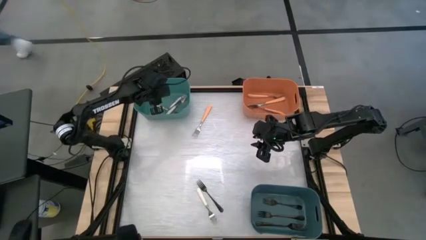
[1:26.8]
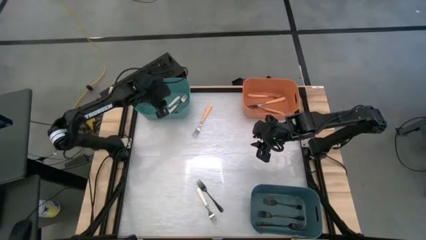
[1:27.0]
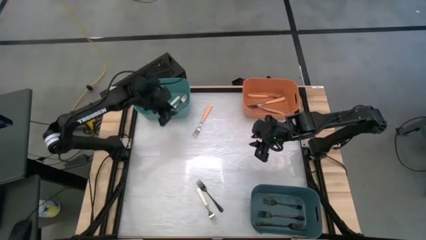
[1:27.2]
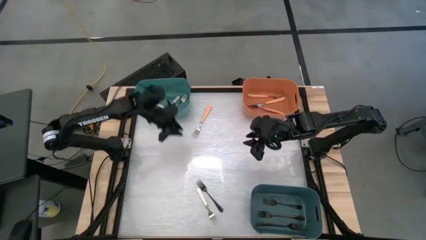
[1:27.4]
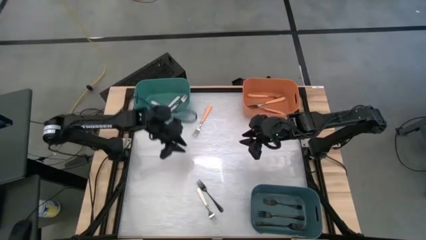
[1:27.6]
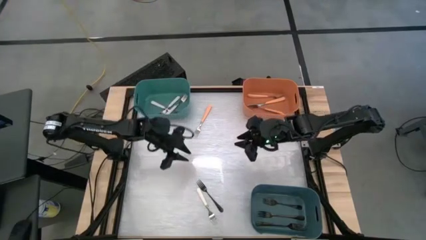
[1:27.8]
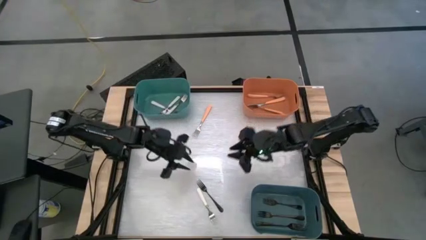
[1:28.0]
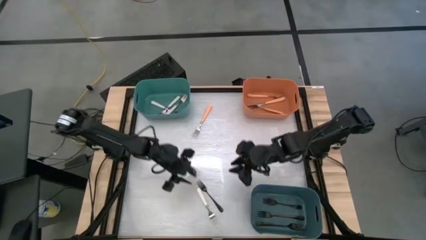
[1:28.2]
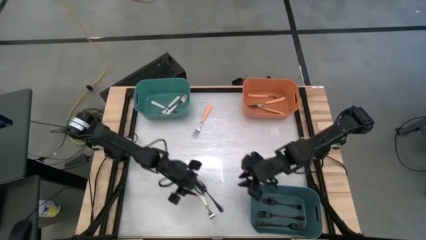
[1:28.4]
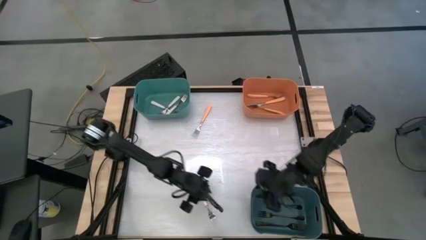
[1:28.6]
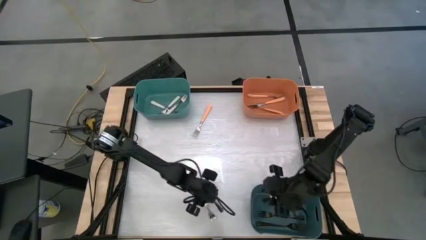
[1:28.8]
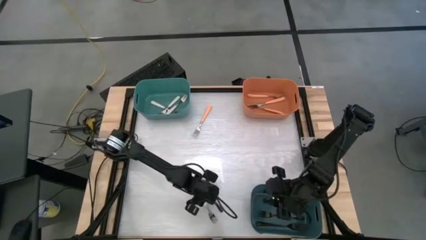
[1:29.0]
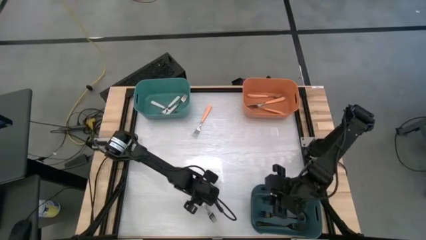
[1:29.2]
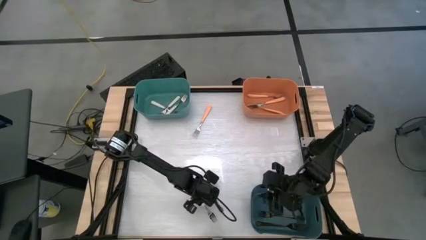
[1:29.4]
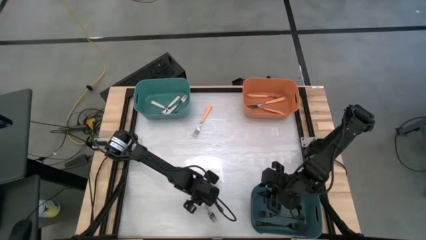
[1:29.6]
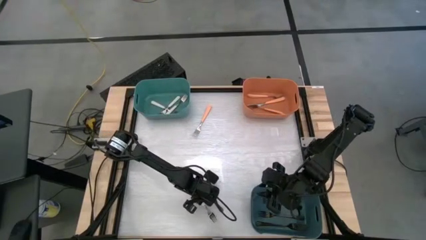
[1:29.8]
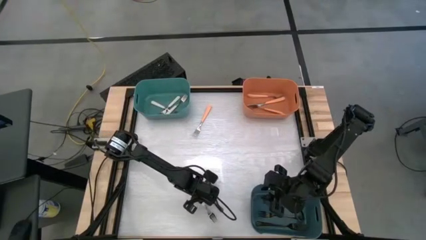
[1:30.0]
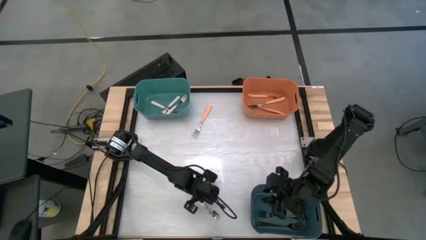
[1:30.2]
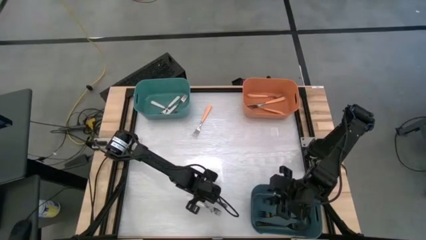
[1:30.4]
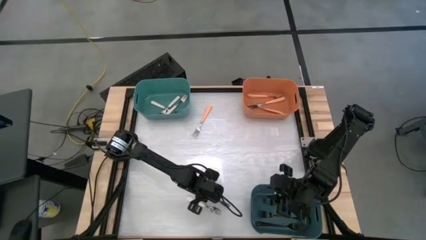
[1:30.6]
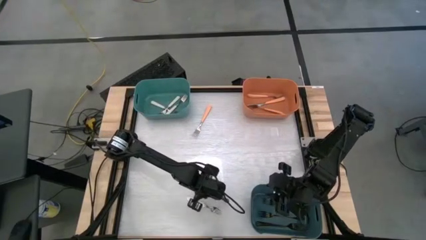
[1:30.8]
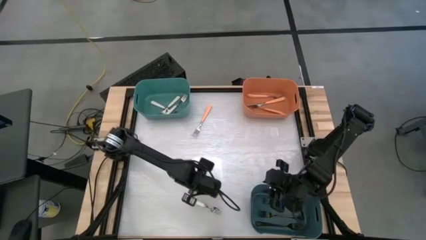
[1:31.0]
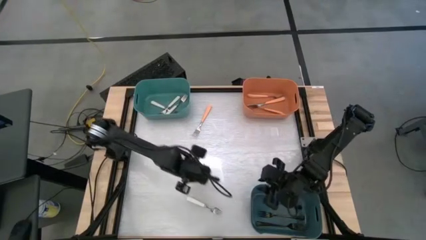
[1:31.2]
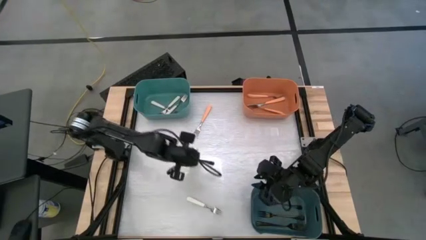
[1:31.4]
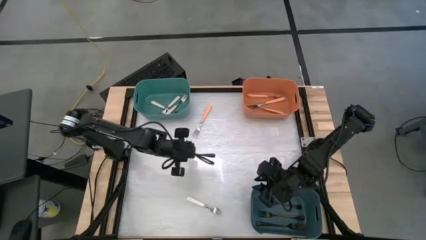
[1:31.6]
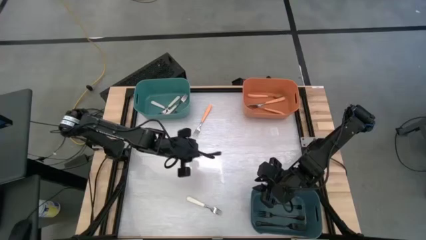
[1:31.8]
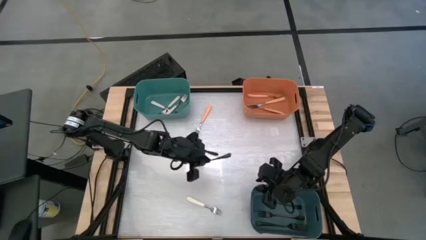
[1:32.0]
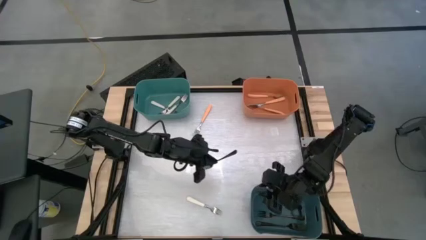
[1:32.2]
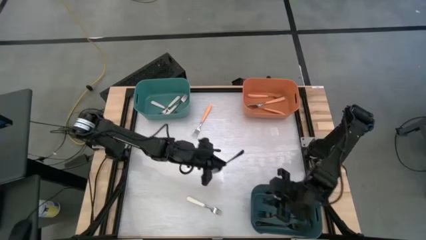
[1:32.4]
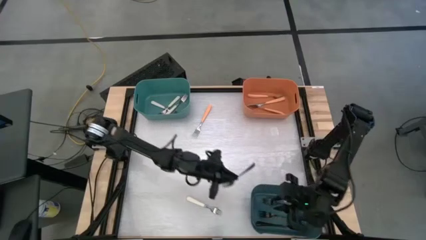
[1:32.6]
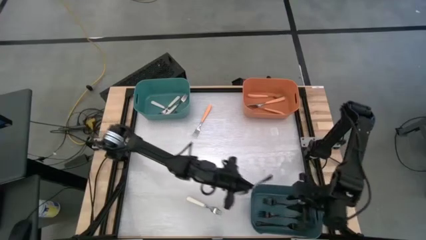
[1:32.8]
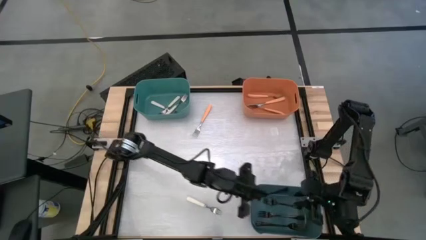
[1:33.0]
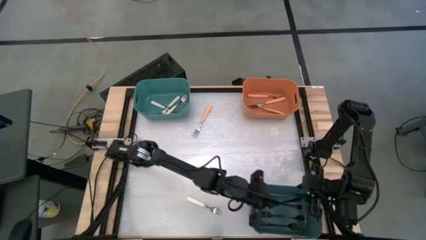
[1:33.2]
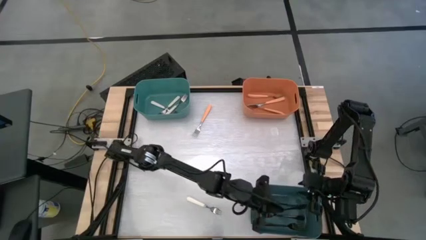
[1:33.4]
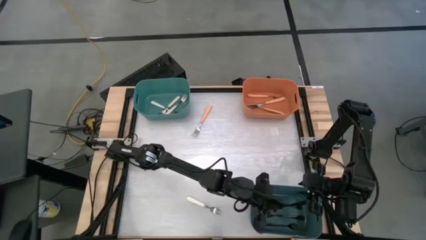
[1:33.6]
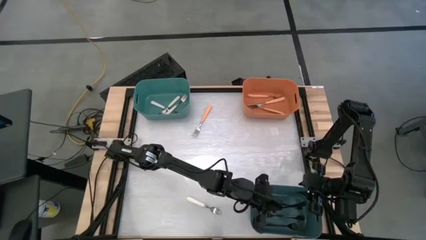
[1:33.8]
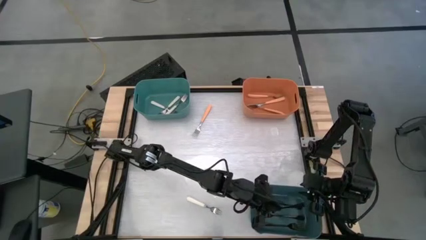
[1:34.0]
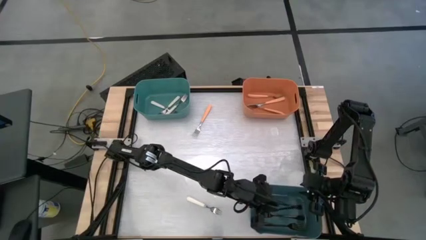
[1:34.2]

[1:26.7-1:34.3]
Task: Sort silverware by color (type)
Put the black fork into the blue bin

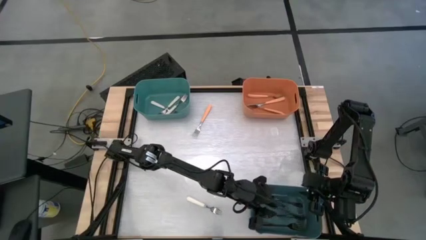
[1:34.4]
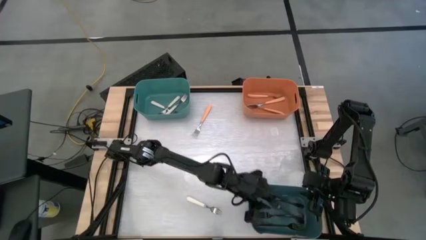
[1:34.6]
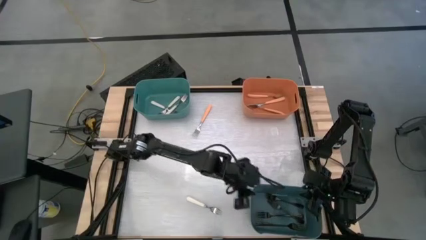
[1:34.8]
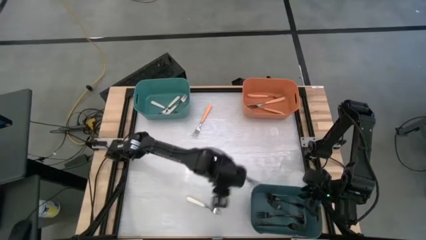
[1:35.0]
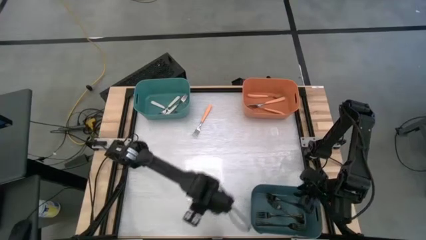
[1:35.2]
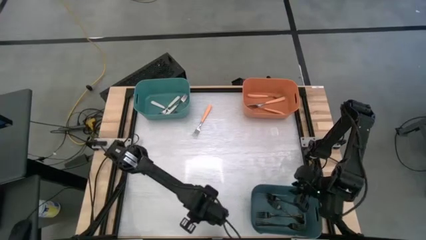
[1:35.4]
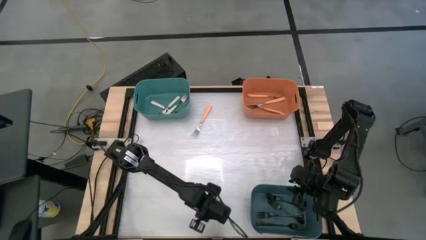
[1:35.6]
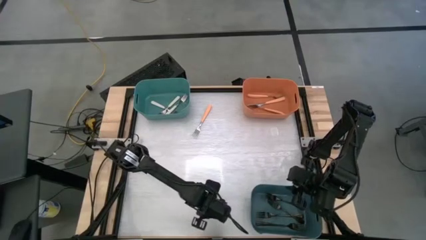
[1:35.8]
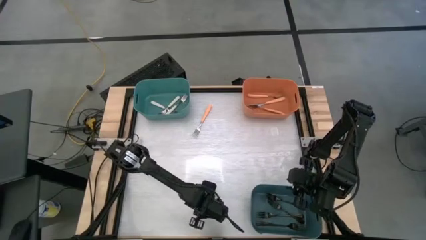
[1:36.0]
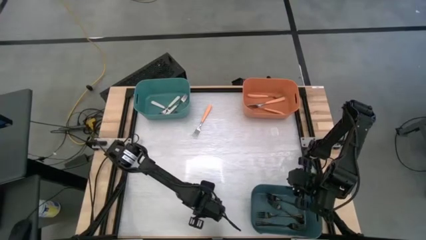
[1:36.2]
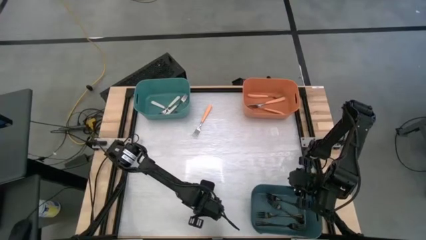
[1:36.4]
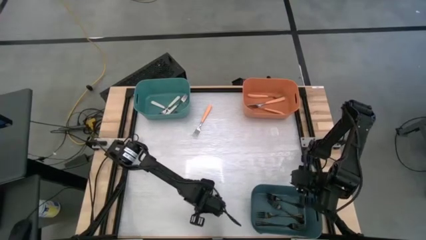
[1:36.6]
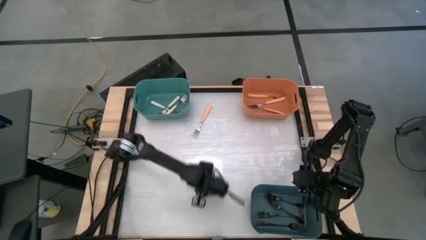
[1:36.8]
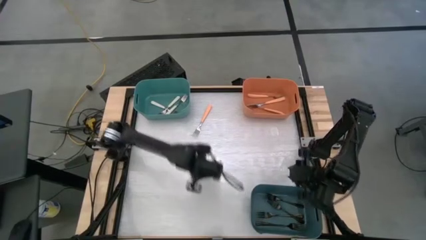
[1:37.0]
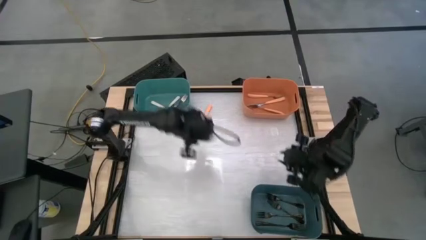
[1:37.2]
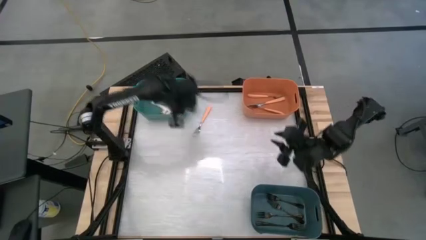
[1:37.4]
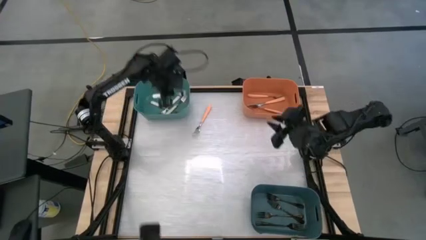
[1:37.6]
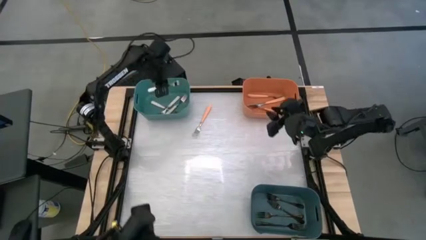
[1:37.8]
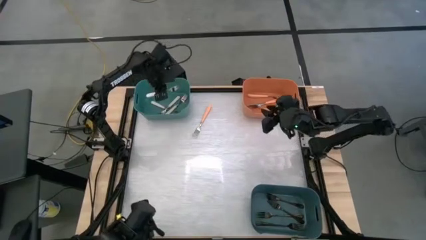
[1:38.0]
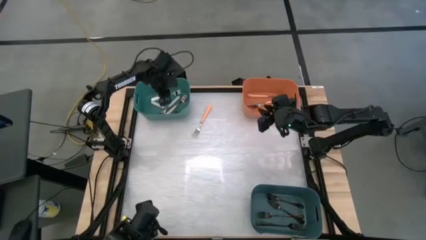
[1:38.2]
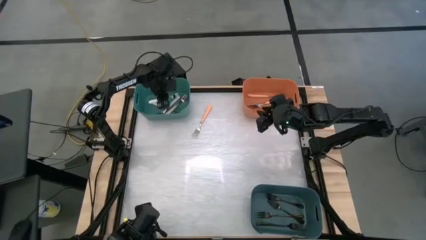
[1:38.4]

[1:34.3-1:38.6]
Put the white fork into the green bin

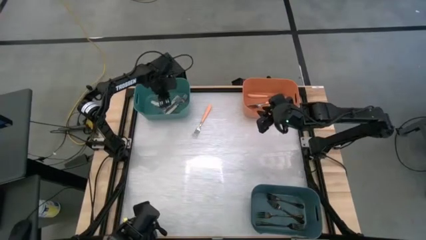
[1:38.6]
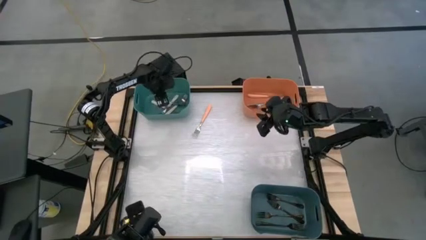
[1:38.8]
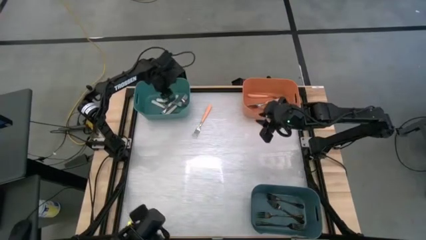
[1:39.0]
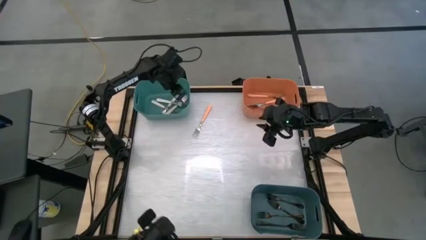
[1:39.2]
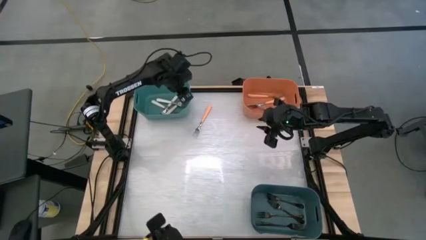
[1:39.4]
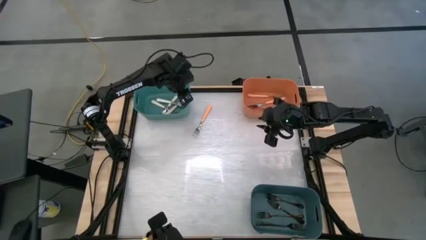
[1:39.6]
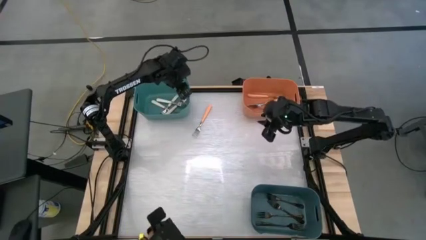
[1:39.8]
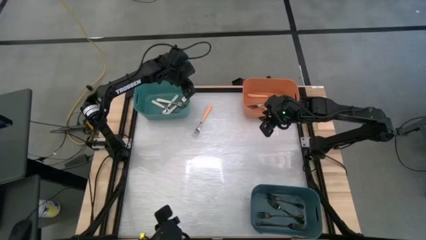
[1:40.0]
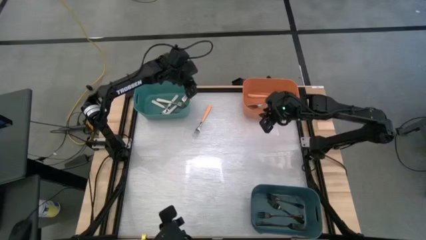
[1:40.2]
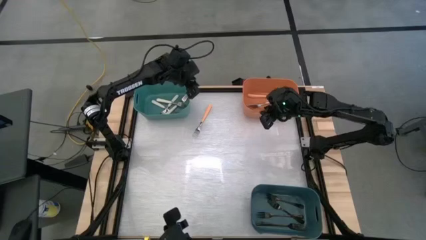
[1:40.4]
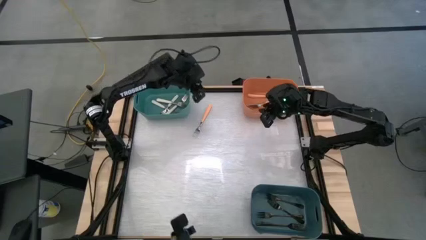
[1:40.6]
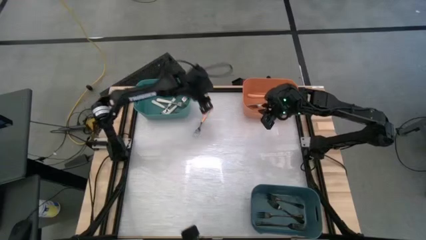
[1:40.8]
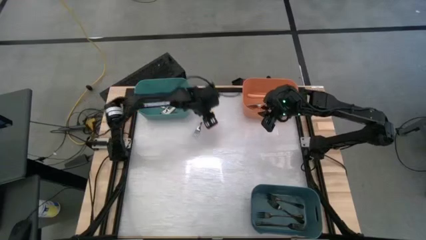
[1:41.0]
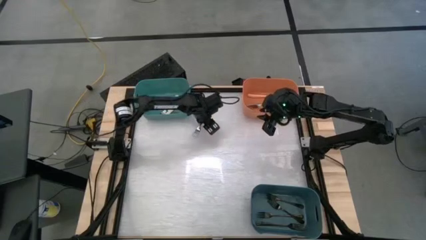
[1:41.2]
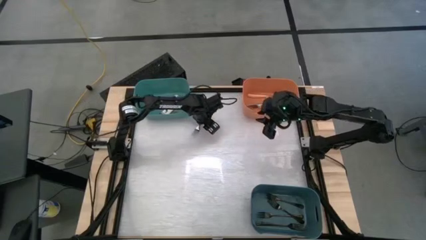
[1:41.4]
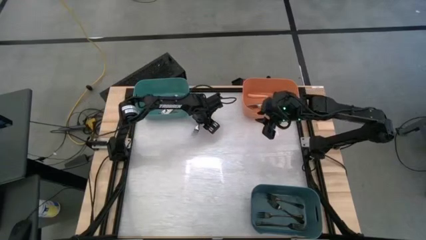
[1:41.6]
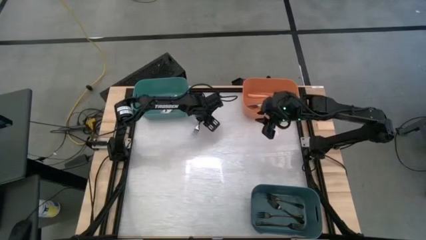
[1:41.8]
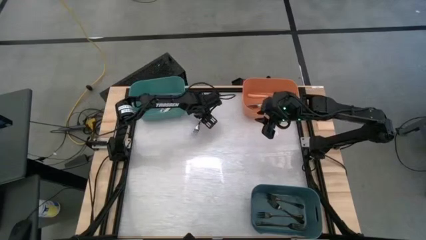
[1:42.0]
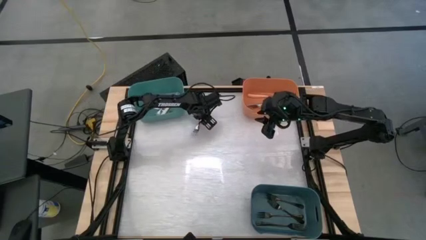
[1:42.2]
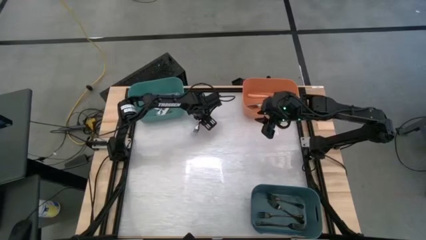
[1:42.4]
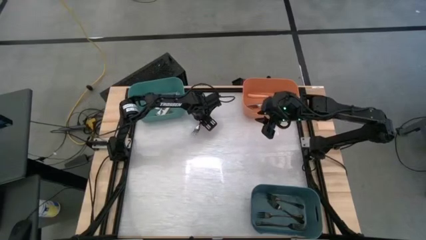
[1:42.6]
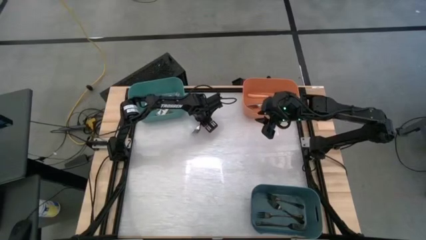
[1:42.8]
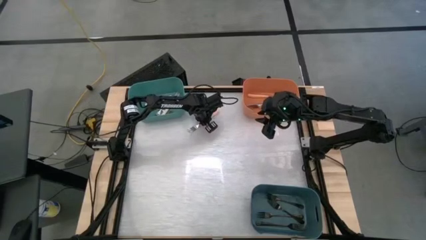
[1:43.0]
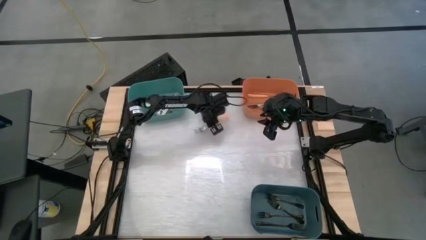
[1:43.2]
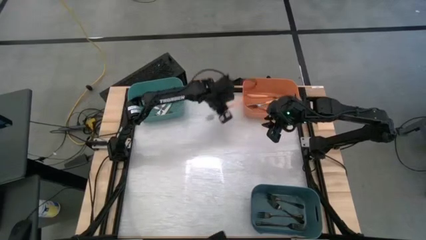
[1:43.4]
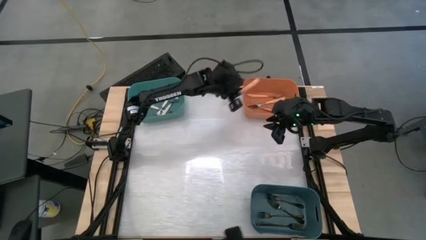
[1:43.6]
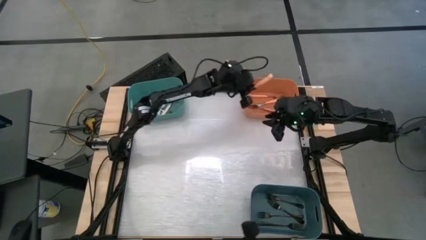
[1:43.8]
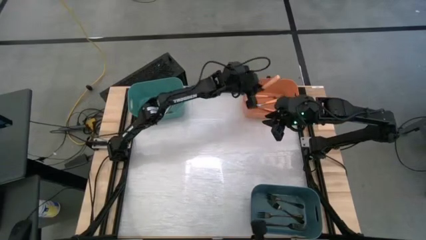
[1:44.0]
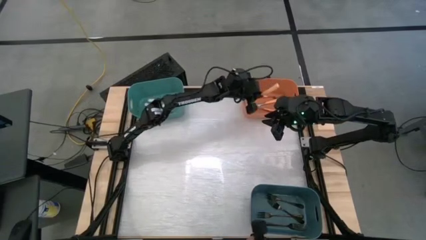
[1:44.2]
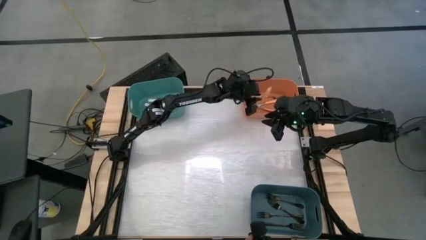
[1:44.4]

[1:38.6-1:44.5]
Put the orange fork into the orange bin
